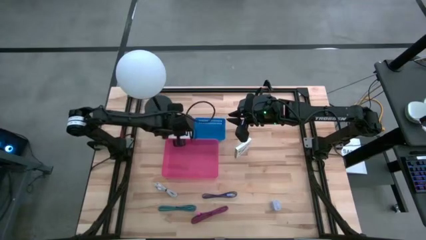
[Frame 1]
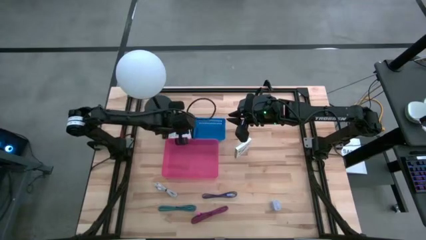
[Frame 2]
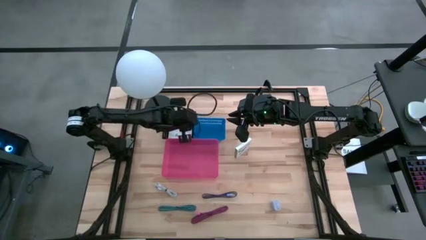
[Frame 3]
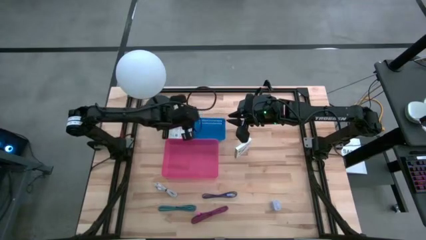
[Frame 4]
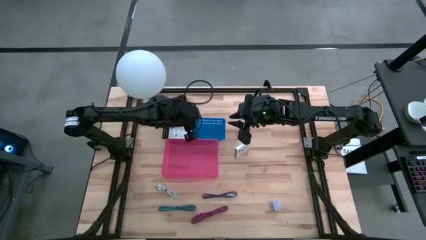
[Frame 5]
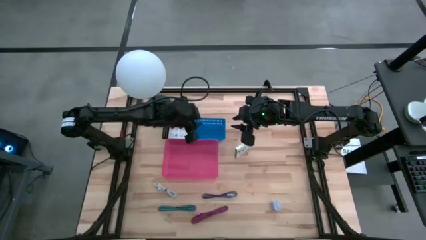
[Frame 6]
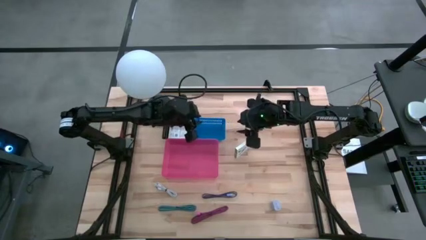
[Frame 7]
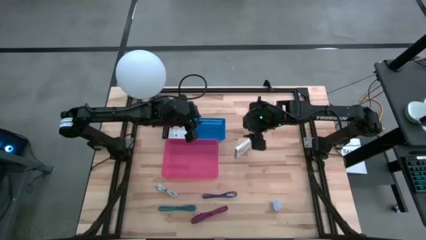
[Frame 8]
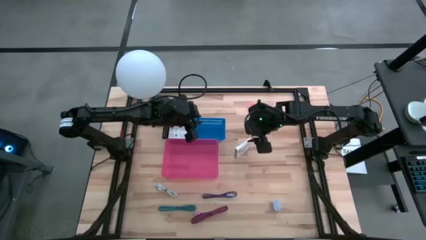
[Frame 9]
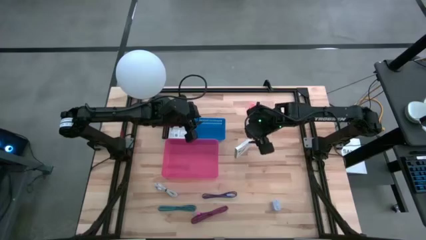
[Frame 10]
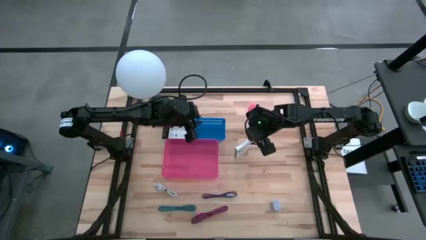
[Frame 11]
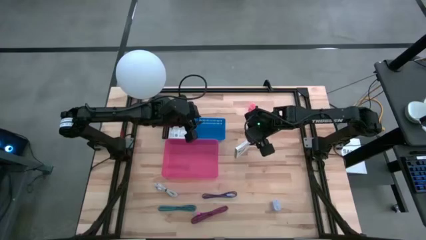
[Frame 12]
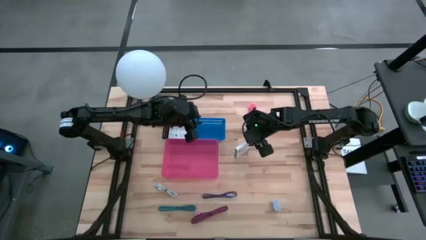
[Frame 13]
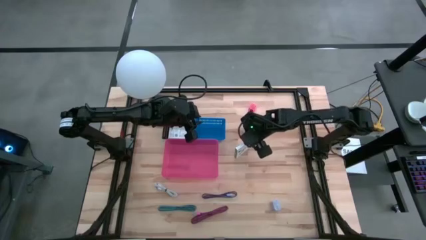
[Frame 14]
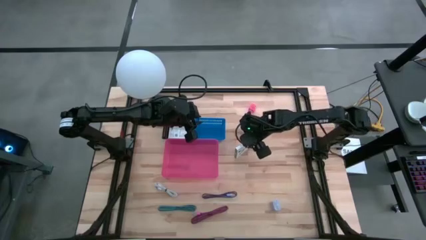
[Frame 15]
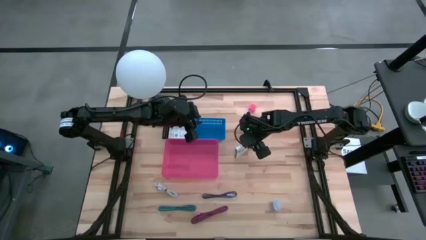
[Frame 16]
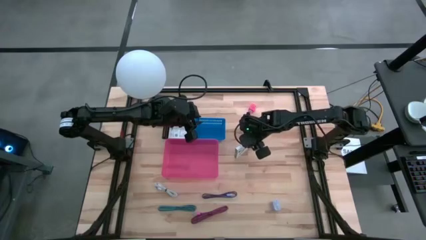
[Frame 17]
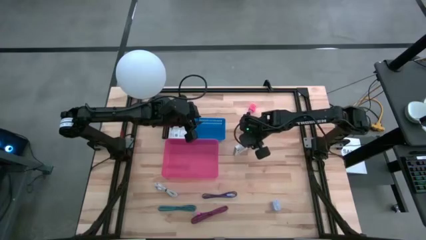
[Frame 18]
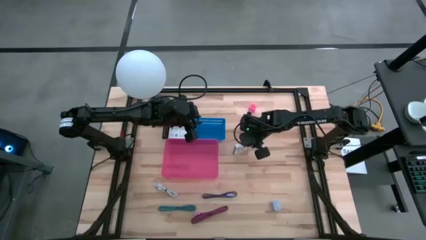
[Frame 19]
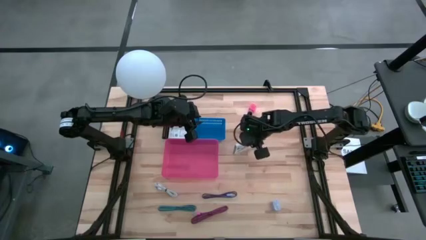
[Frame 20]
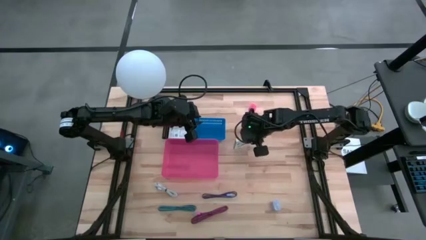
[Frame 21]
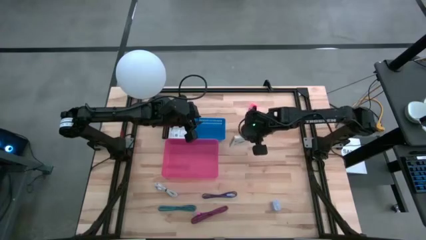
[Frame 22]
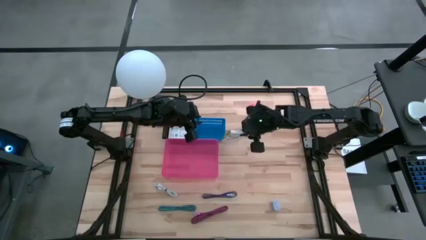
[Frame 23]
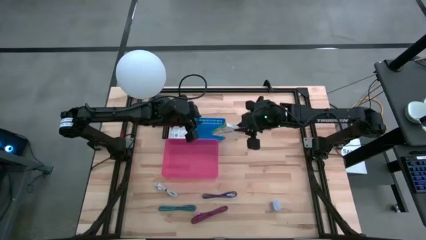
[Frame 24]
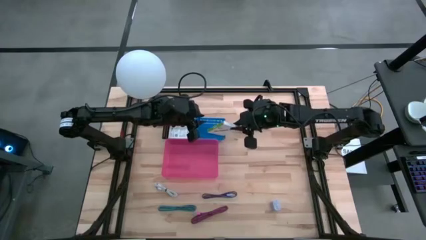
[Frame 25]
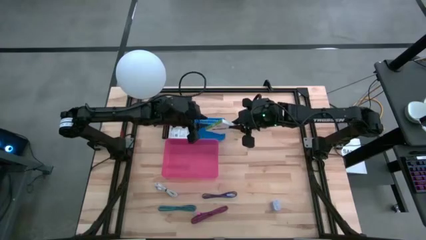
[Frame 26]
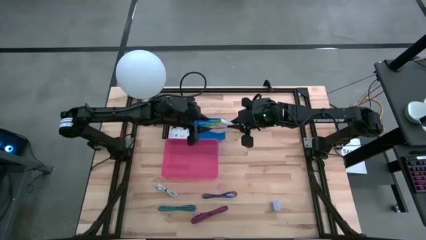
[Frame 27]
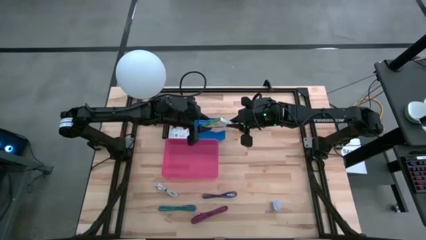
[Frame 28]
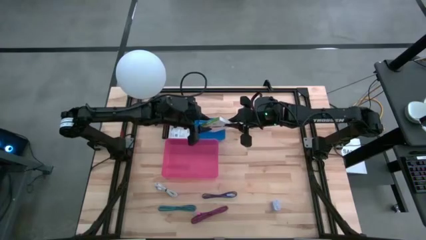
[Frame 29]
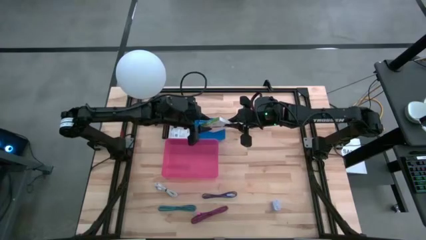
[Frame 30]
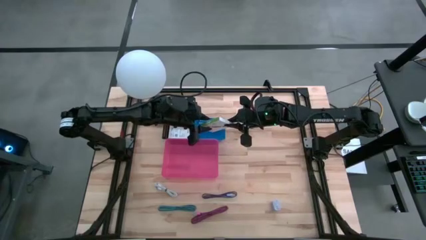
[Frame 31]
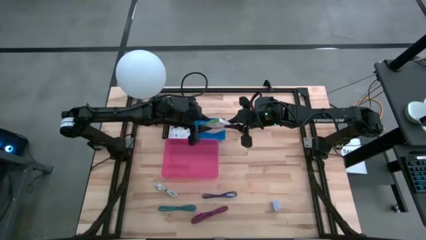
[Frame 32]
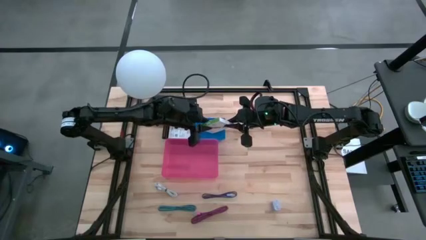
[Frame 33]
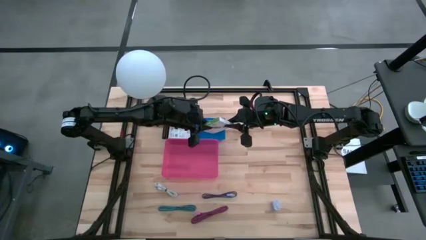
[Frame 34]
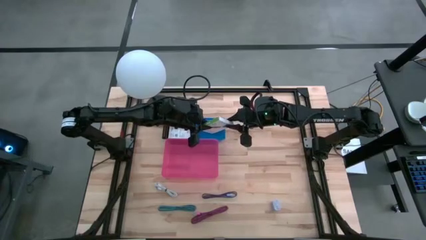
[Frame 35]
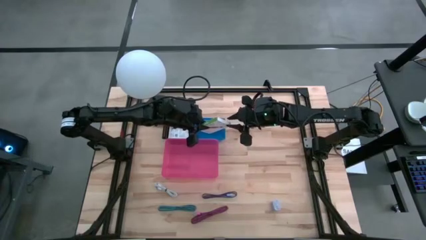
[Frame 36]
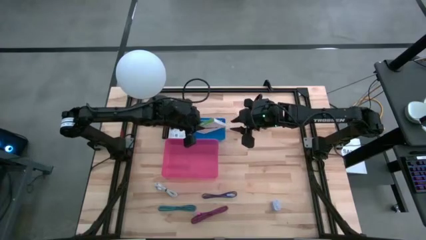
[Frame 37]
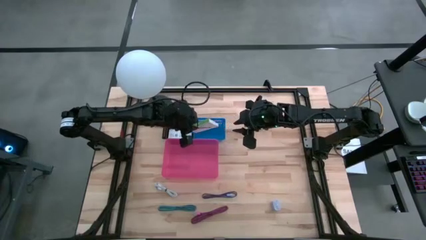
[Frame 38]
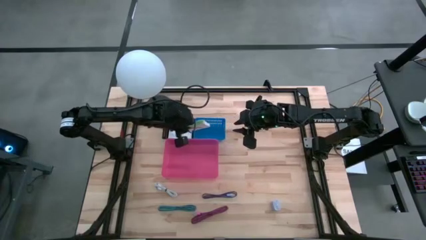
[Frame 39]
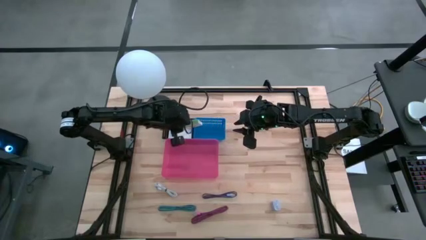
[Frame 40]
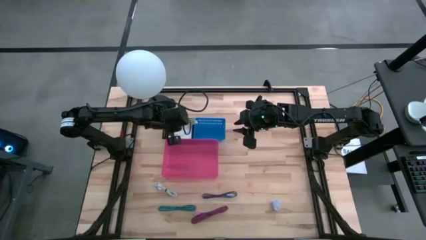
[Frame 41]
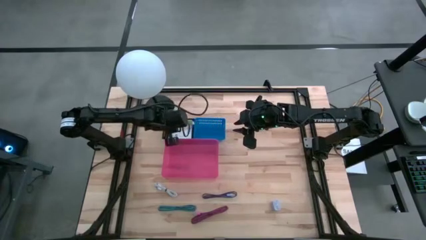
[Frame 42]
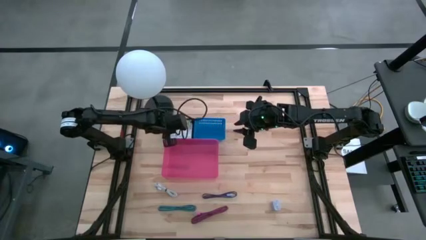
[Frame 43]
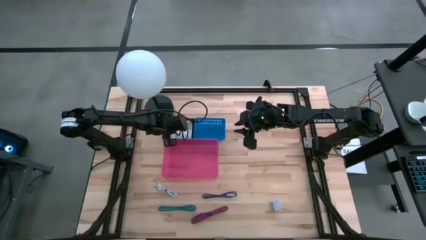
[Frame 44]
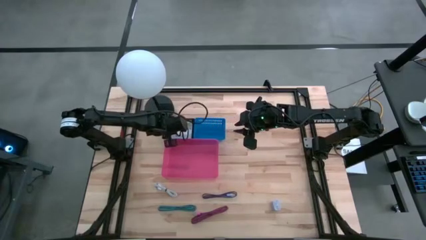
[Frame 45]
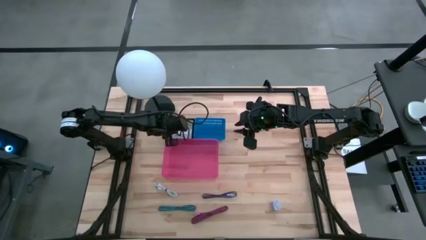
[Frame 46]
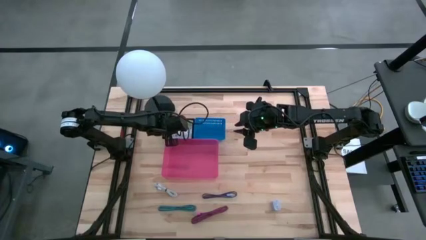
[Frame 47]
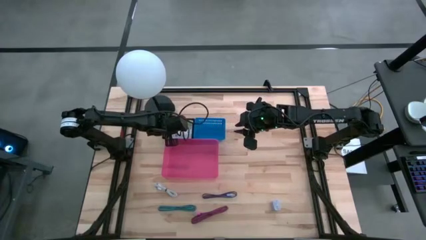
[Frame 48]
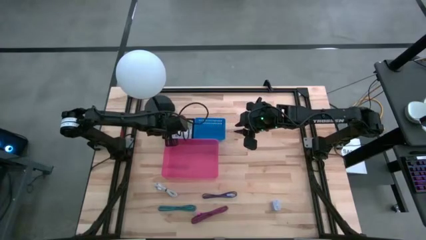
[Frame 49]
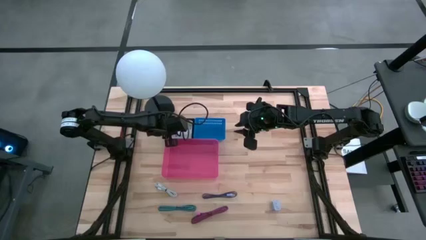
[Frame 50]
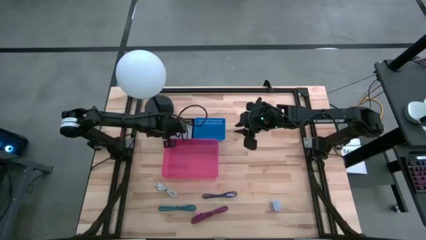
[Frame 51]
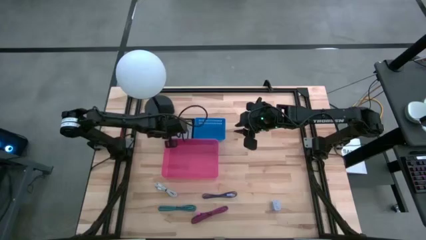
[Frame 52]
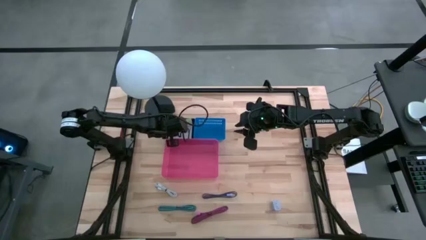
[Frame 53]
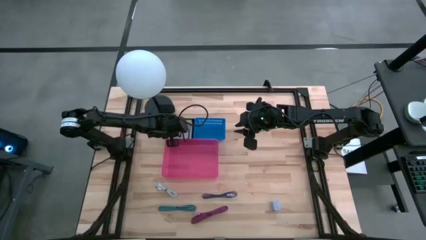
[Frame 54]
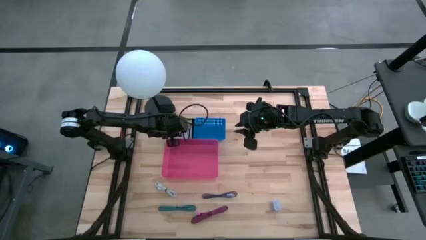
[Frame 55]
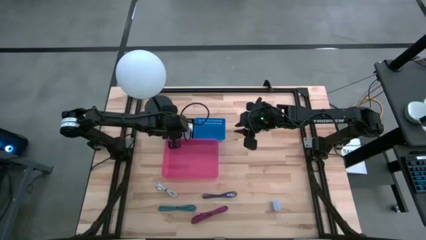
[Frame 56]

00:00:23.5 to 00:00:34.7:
Task: Pick and place items into bin
Put the card reader box into the black bin

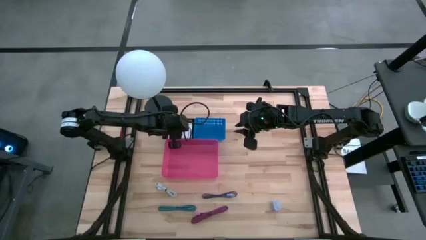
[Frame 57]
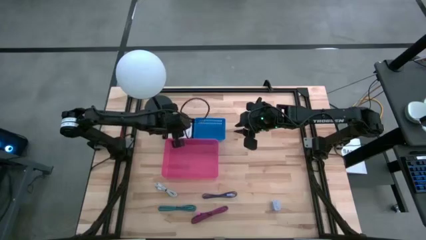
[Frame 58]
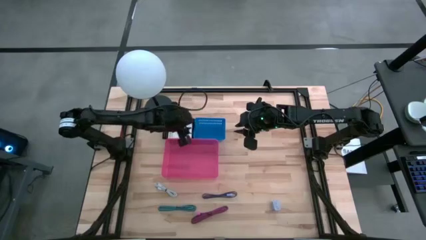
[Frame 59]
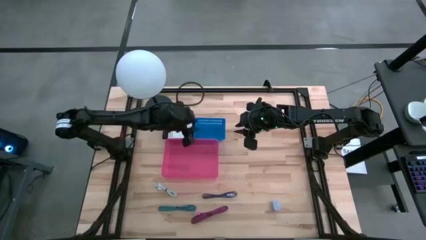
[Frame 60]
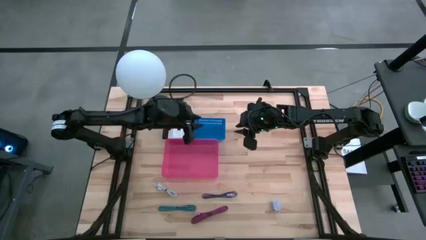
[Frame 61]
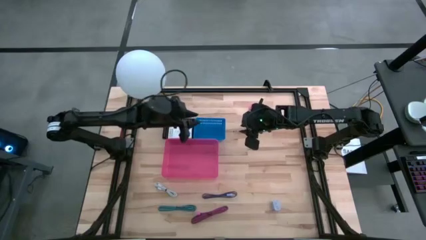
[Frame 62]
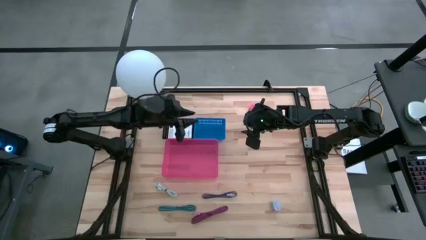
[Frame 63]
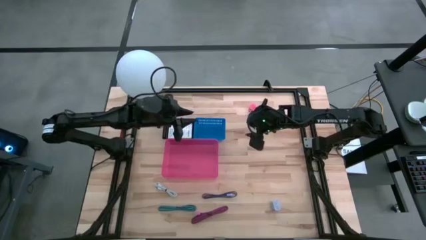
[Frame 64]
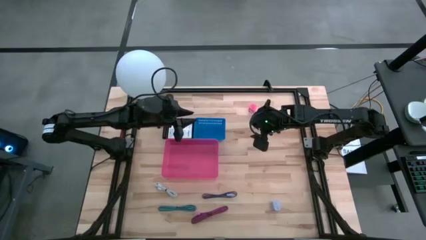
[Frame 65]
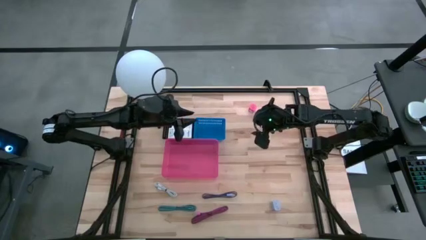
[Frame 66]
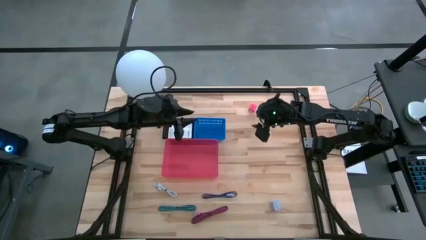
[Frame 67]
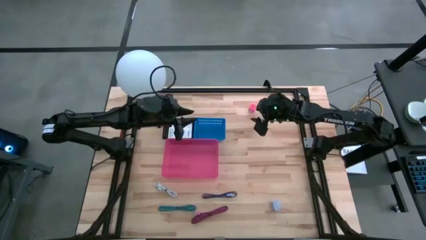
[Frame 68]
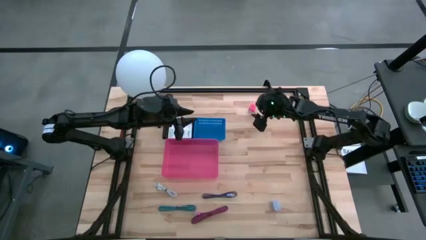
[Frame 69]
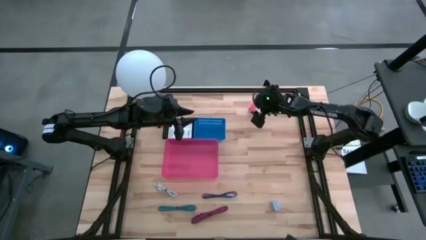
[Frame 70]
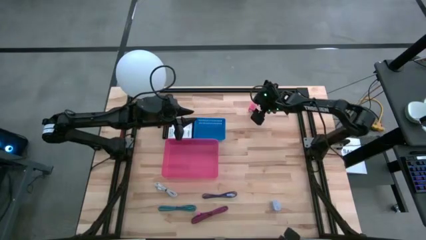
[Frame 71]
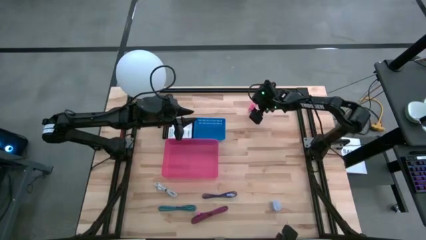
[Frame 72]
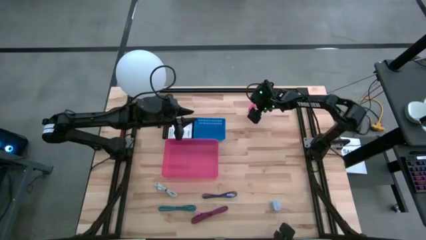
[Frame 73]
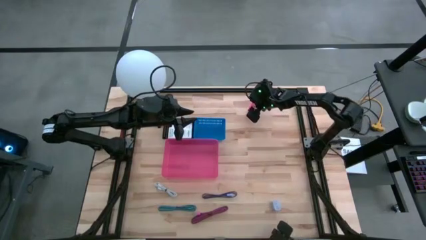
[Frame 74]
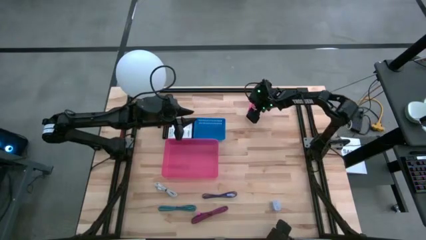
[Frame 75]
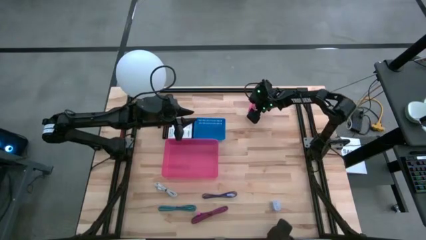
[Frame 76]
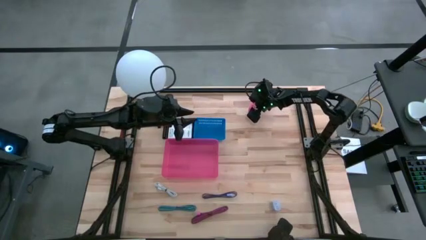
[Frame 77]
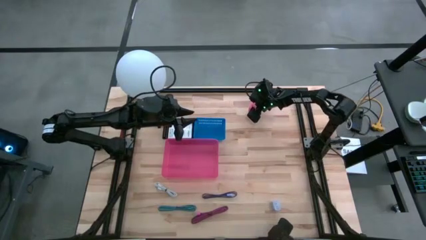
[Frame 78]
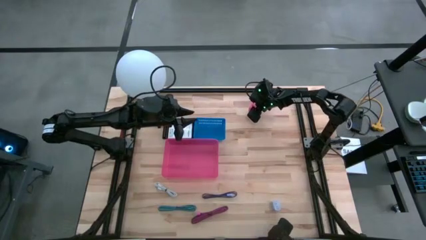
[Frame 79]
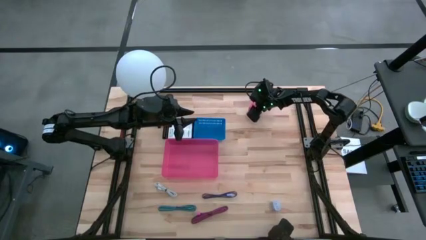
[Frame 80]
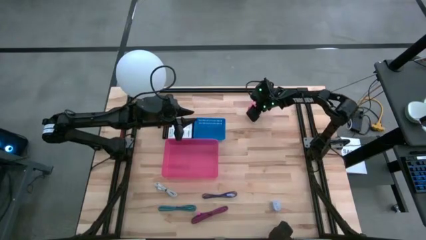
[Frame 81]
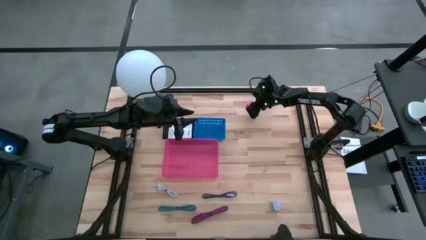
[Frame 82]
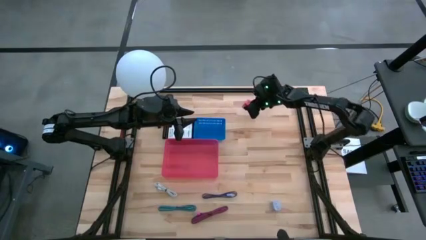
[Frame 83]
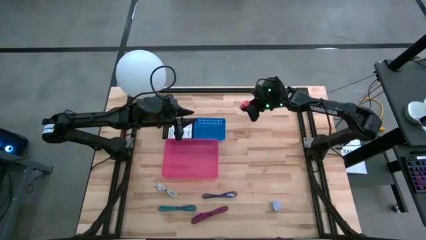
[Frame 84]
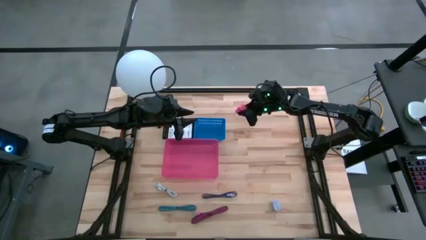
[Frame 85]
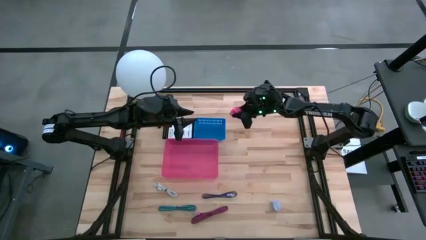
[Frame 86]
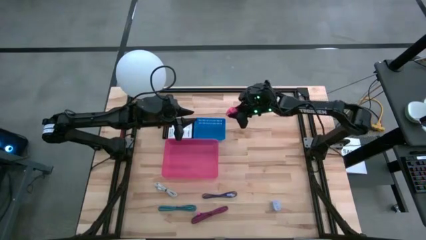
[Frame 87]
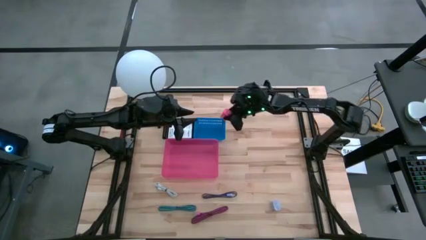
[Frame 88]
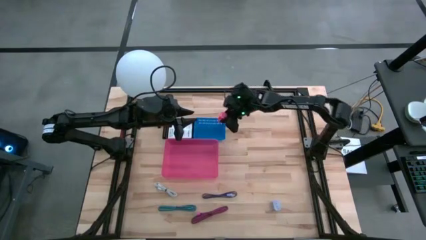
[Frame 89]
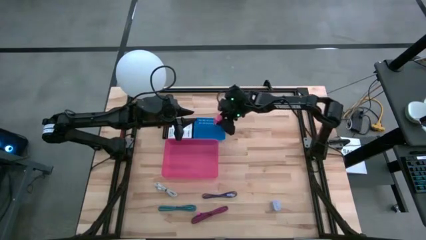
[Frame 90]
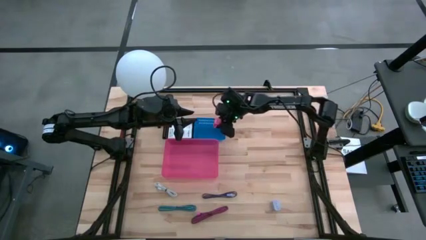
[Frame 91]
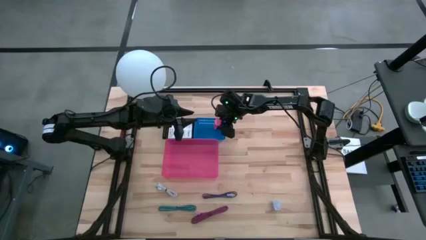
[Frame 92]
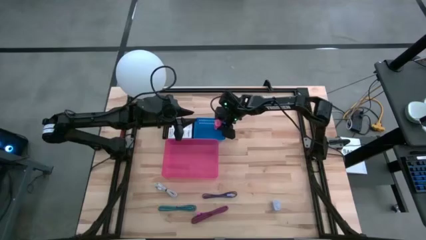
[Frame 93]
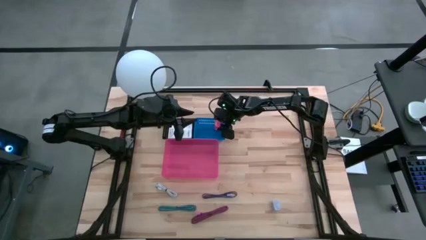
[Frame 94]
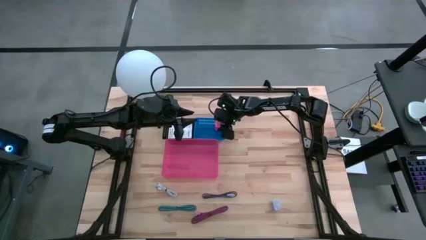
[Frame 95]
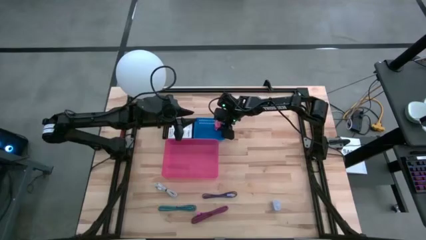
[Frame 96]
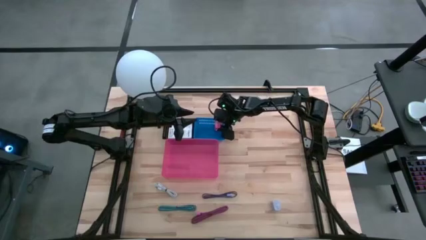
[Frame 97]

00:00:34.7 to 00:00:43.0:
Put the pink charger adapter into the blue bin
